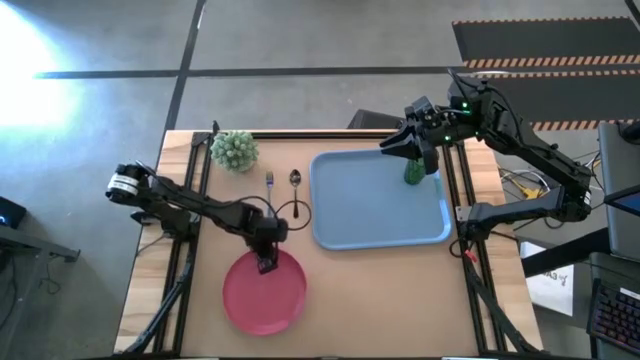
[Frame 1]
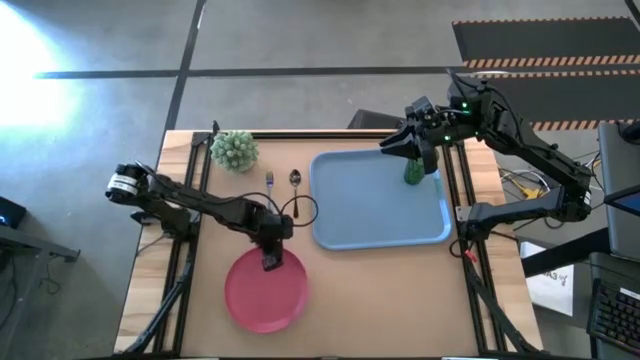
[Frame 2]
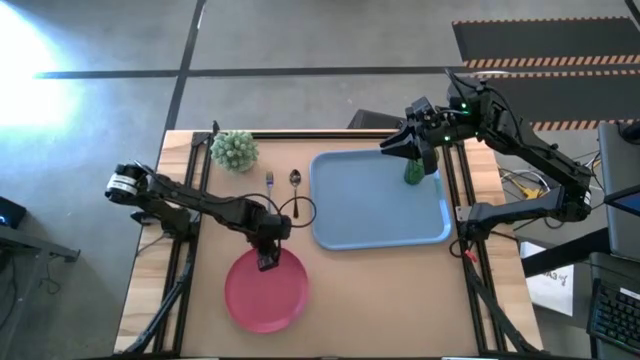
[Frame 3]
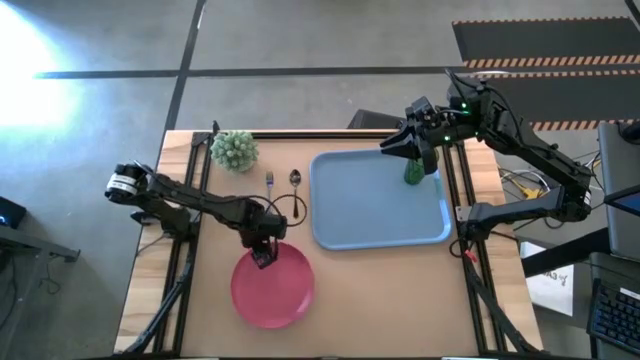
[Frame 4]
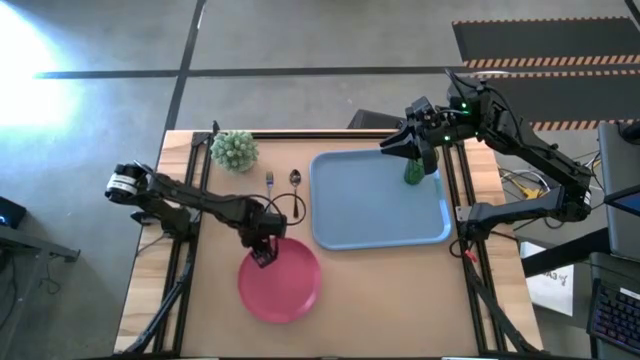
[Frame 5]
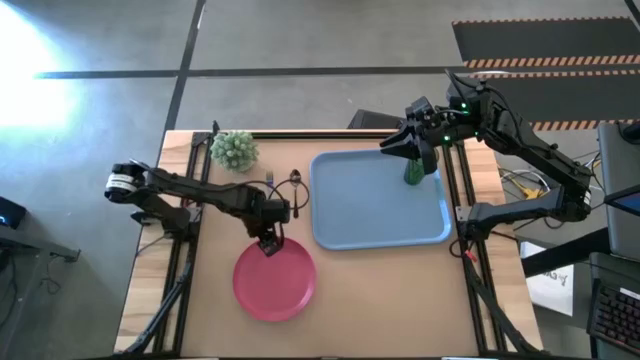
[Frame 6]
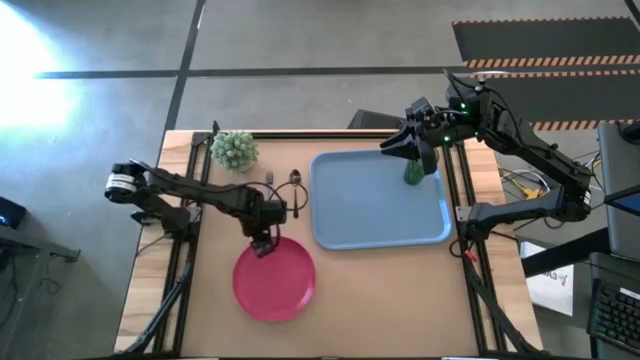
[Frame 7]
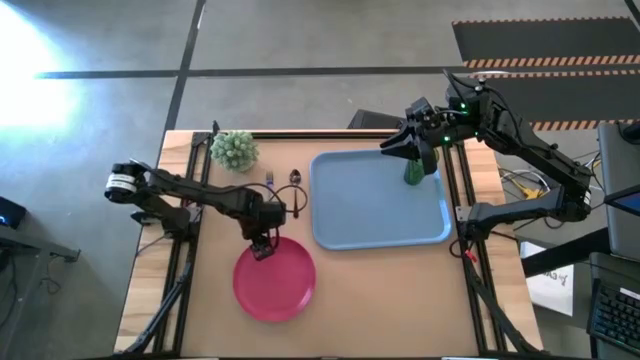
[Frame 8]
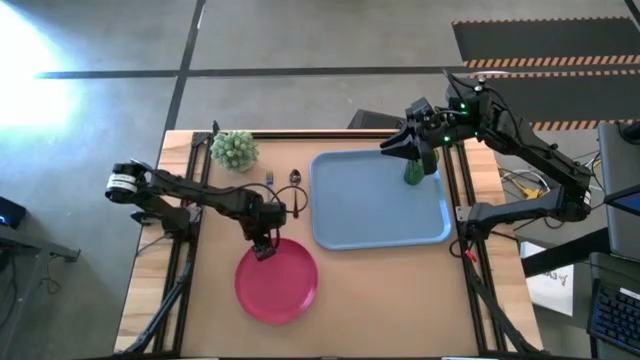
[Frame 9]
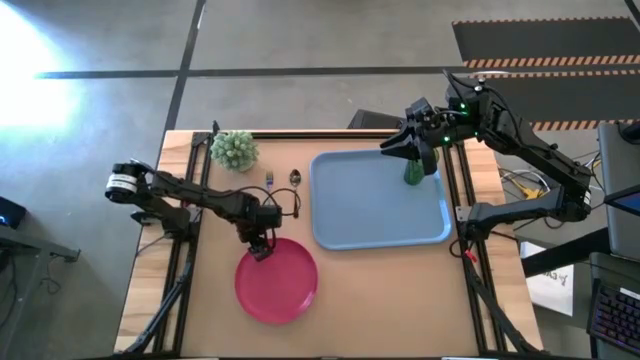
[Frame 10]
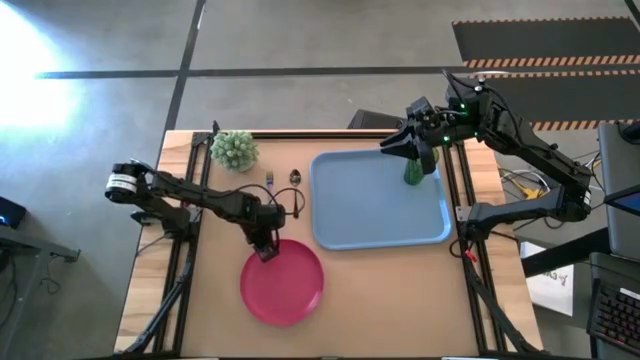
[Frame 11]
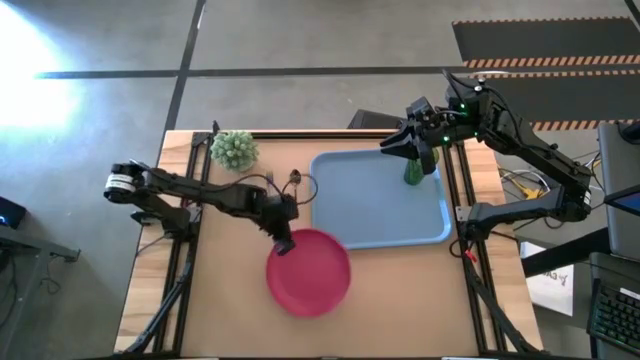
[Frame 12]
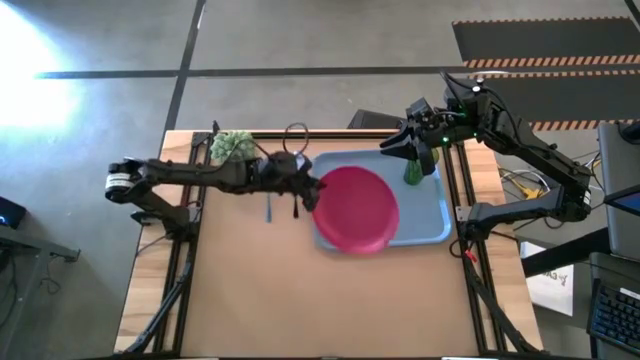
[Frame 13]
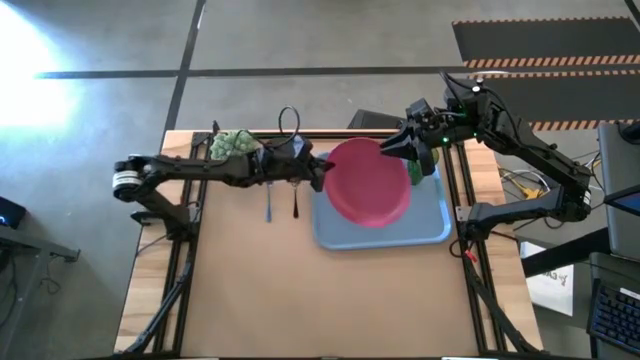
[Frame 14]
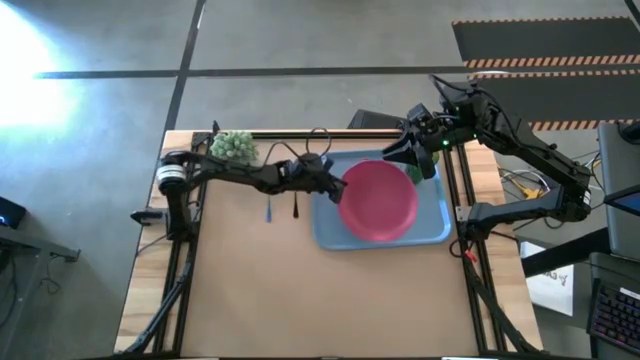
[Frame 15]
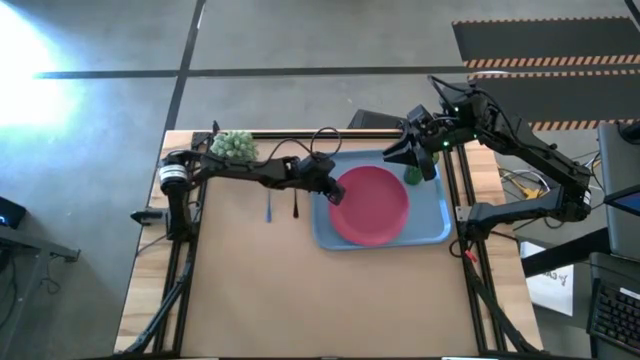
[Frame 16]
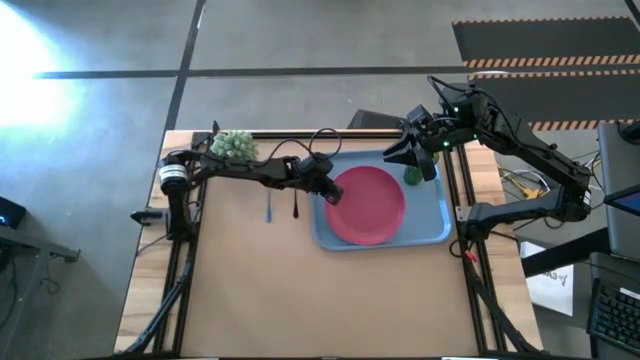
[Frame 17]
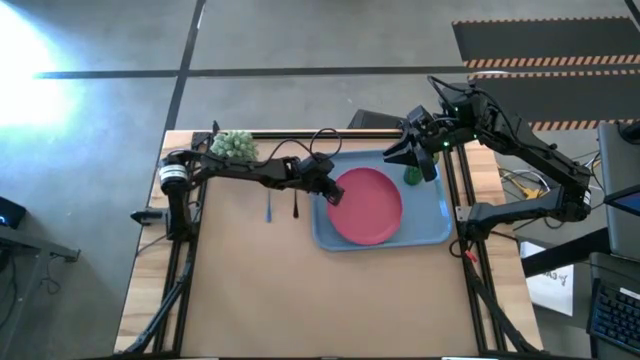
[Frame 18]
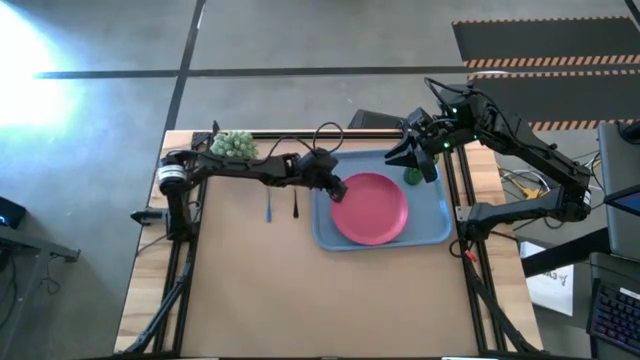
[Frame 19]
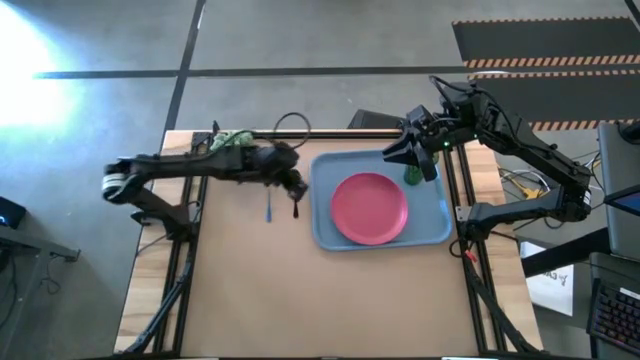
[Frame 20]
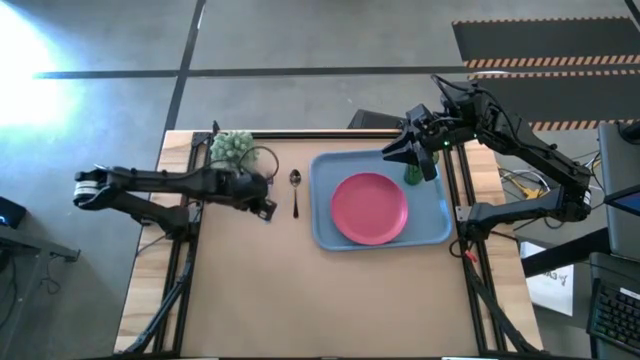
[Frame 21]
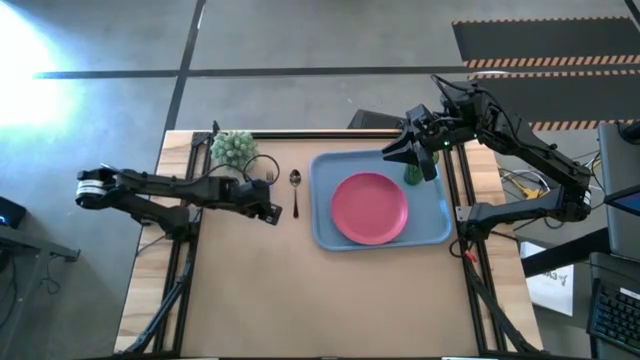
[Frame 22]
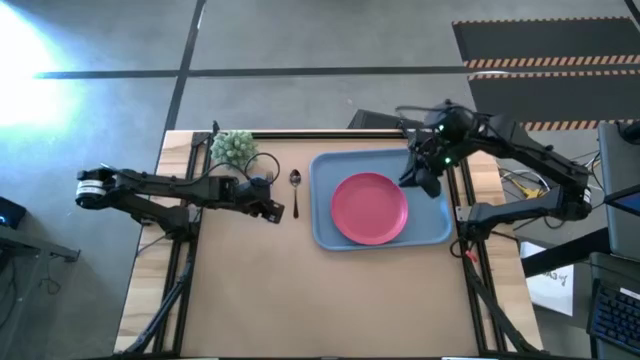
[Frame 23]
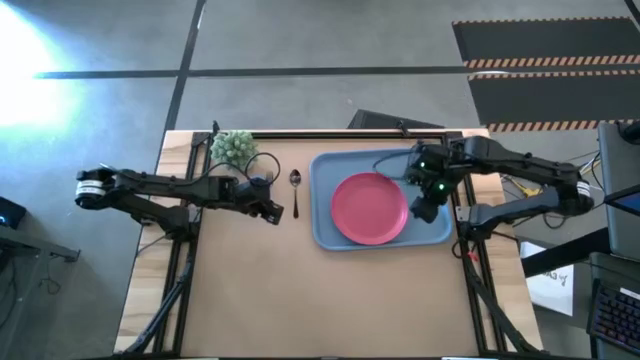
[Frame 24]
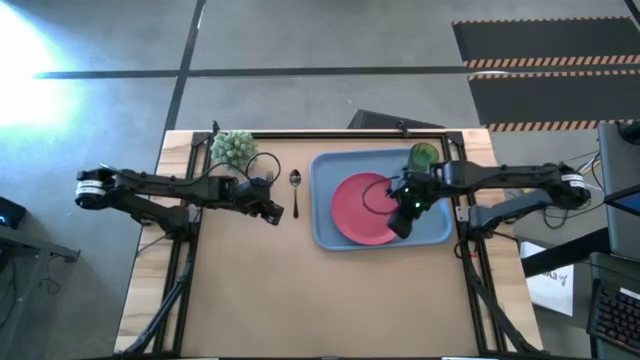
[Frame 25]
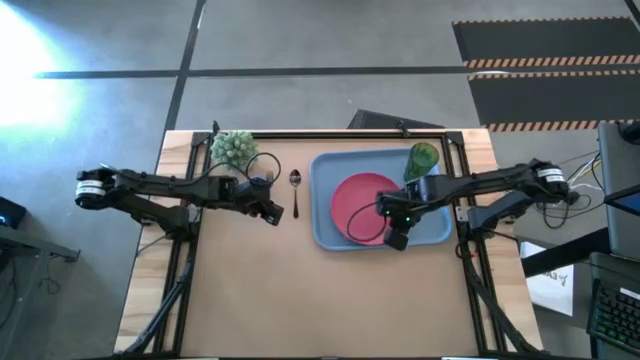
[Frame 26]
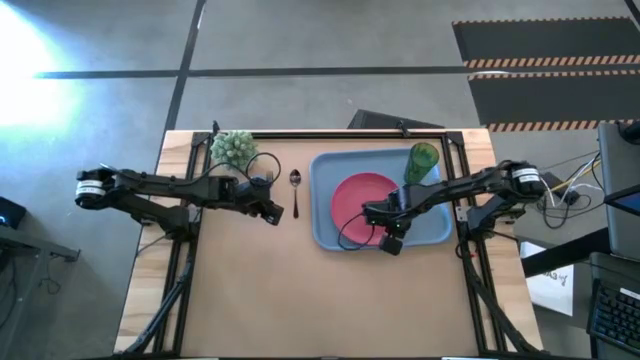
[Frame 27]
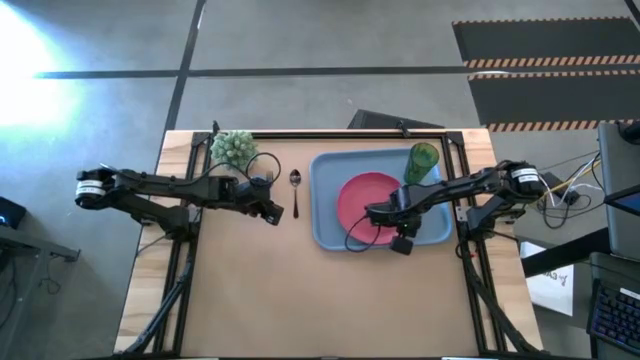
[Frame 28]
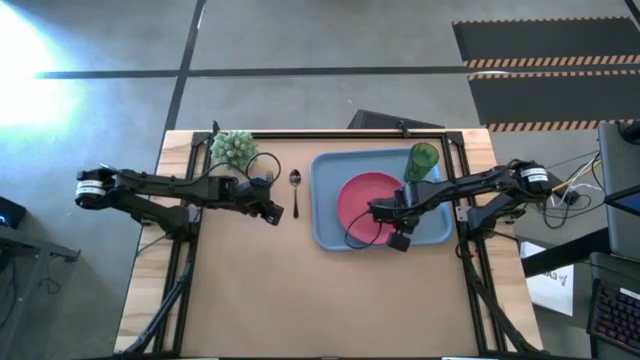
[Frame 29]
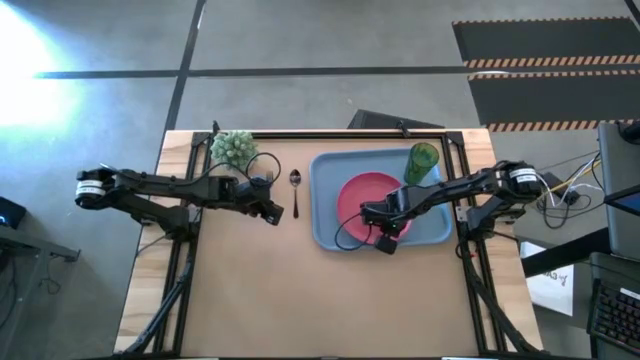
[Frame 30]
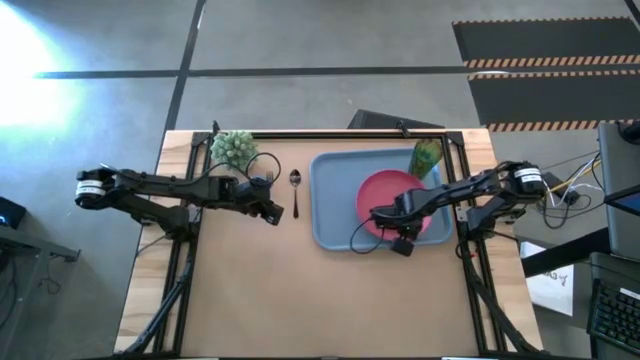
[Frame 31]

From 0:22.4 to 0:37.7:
Task: Pick and place plate/cup/fork/spoon on tray
Put the pink plate on the blue tray

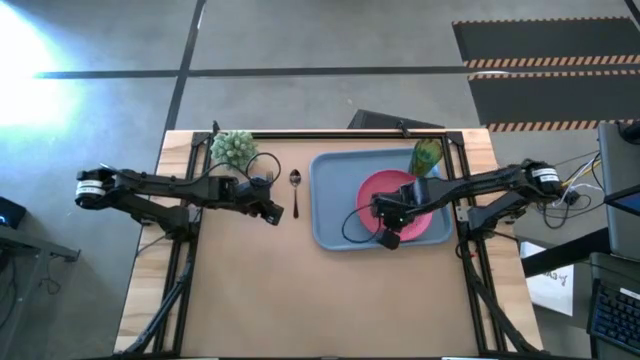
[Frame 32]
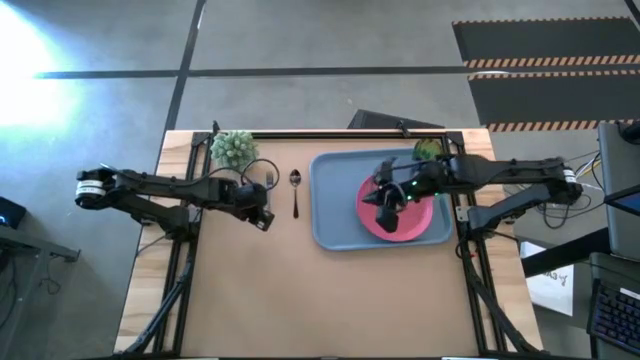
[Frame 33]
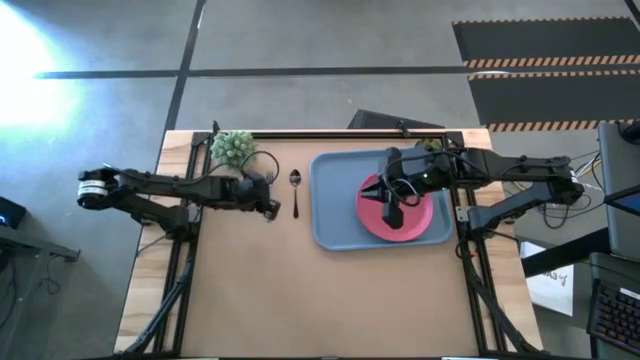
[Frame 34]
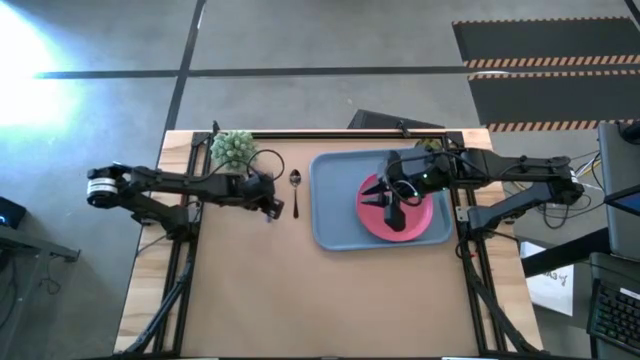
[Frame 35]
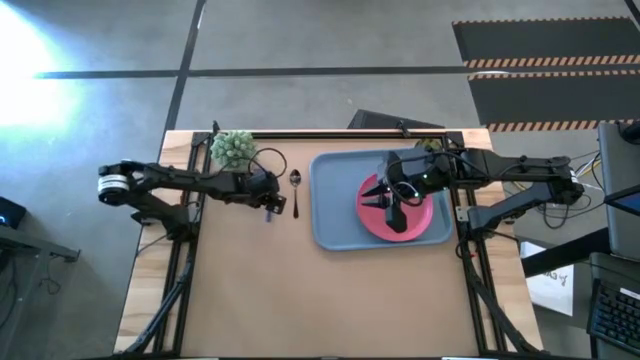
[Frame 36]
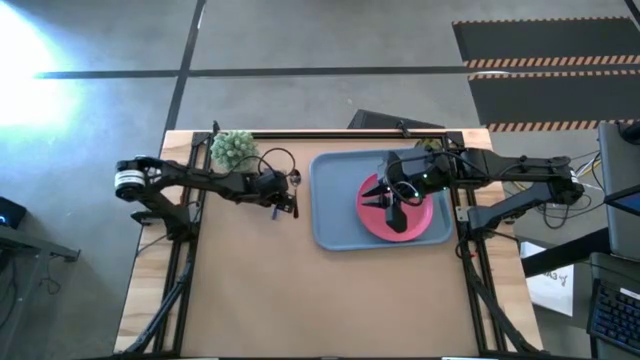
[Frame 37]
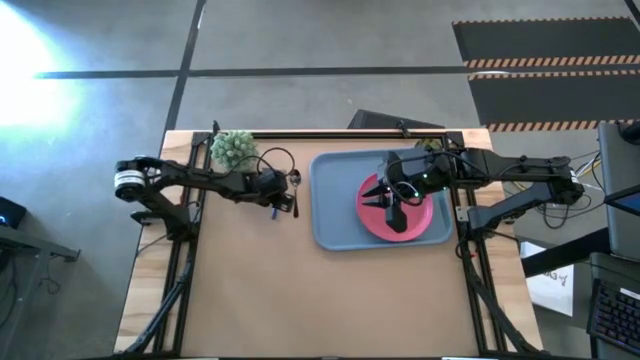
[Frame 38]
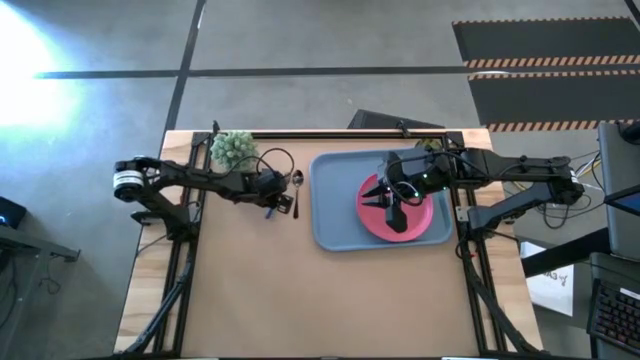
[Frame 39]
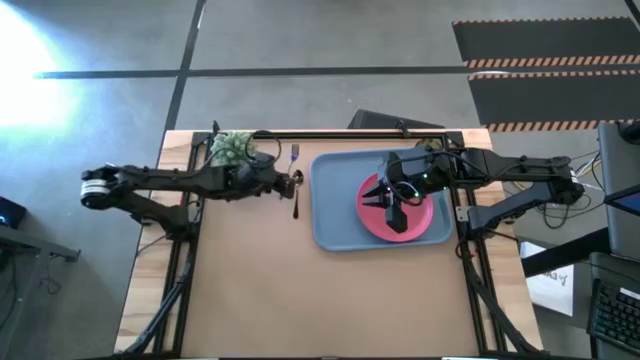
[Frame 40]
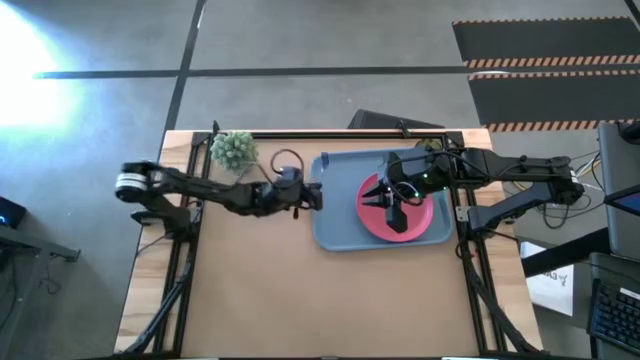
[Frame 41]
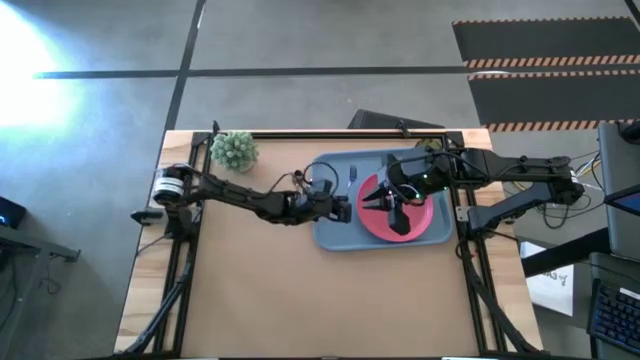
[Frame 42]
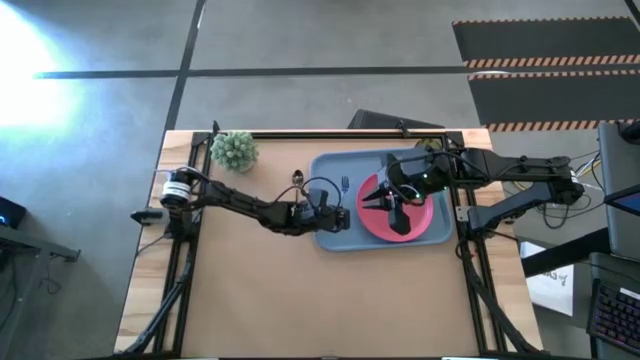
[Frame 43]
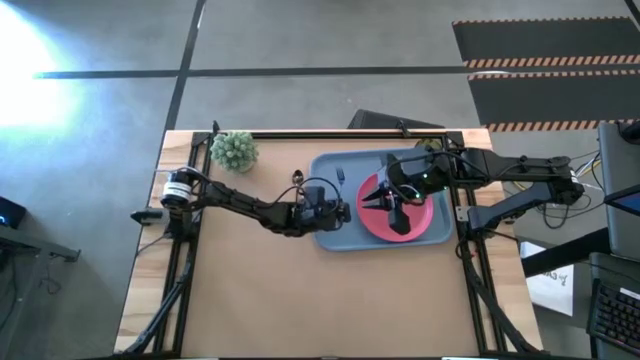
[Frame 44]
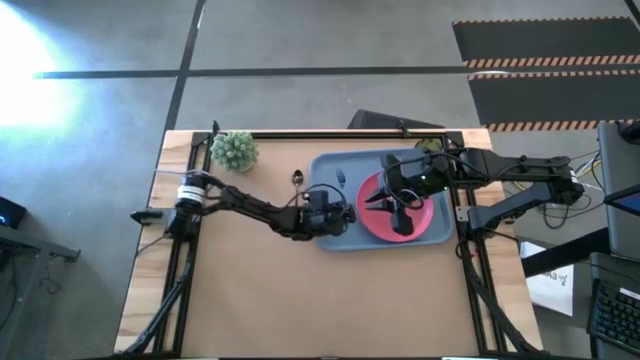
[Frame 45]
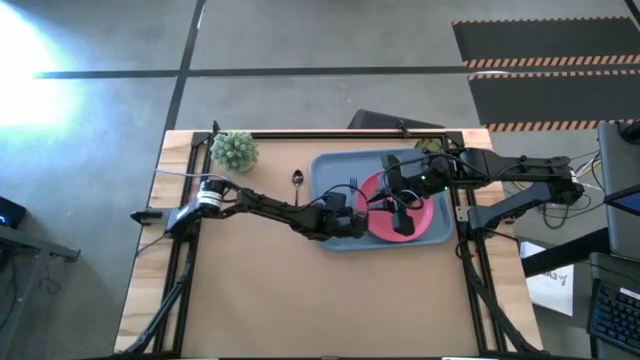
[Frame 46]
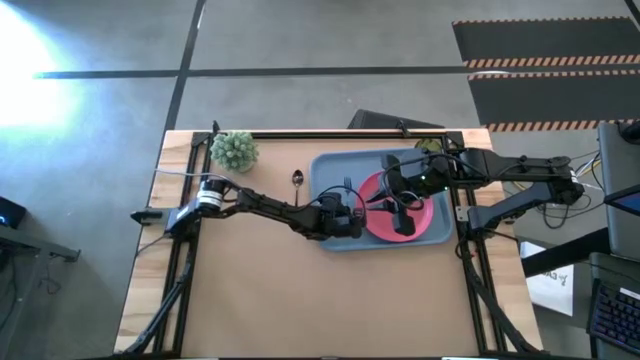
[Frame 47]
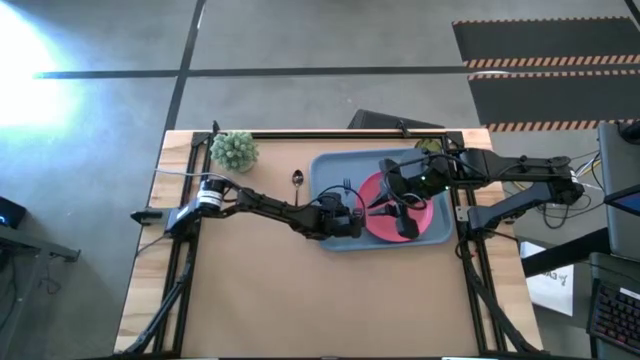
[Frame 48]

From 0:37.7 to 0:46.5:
Put the iridescent fork on the left of the pink plate
